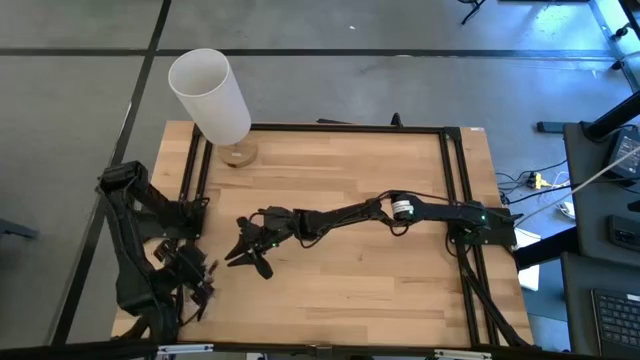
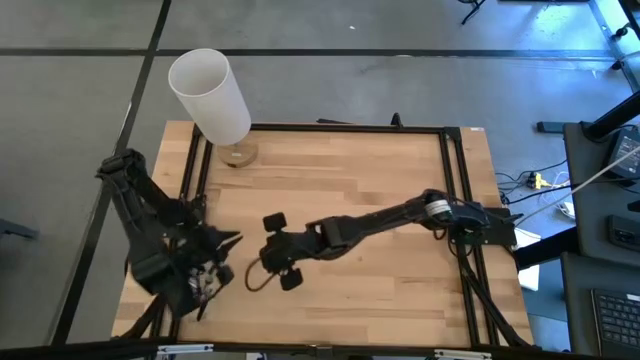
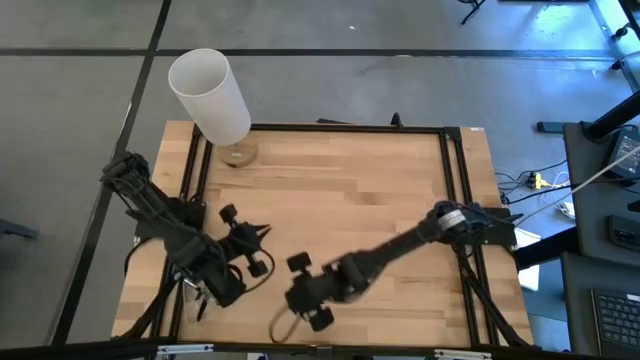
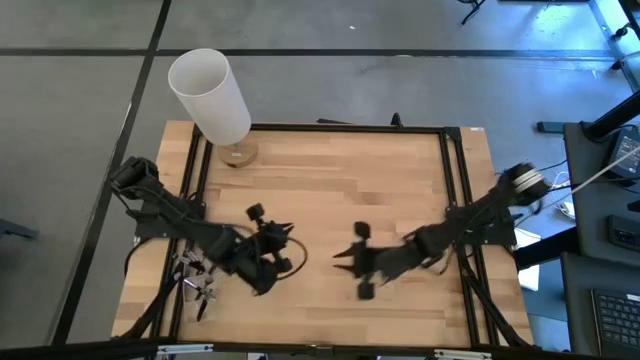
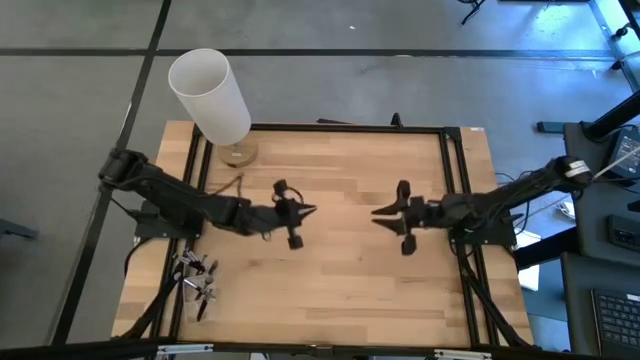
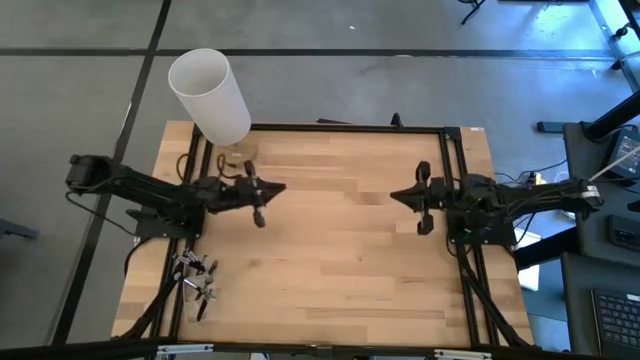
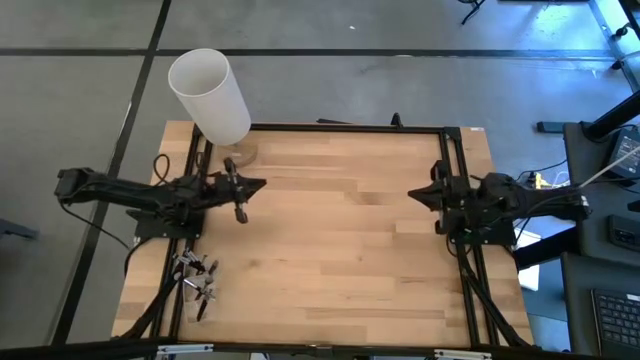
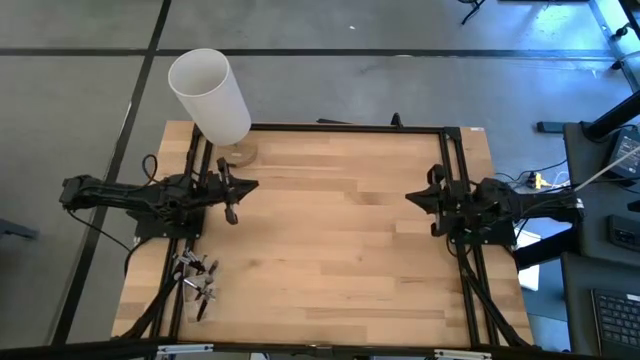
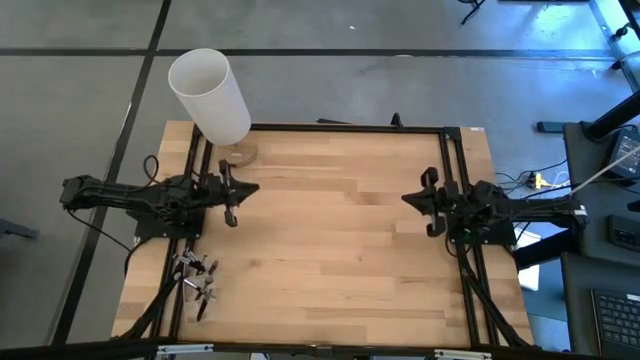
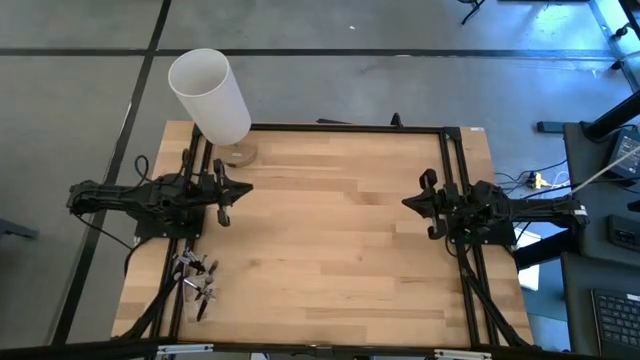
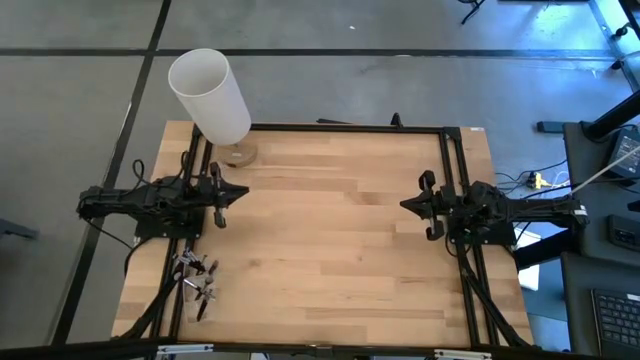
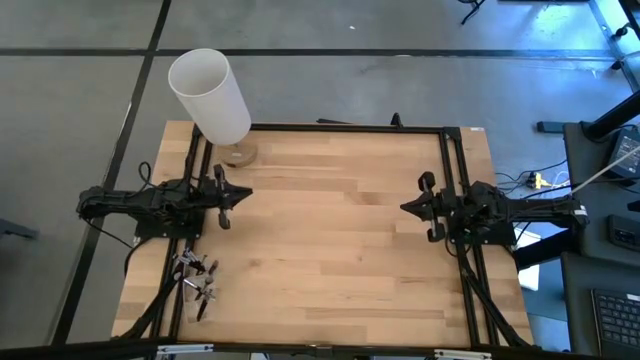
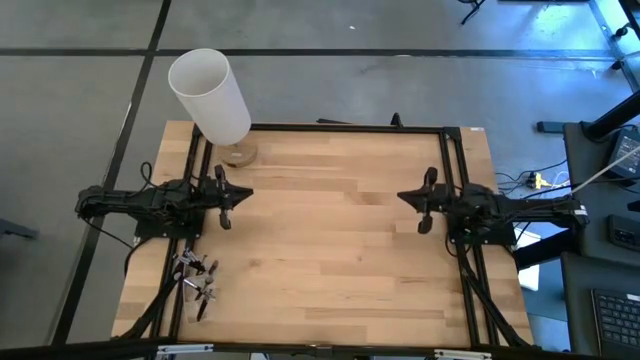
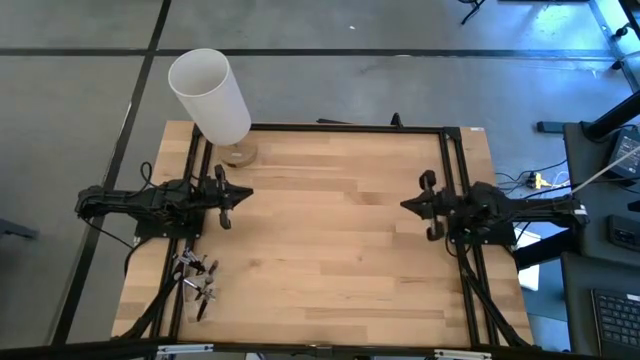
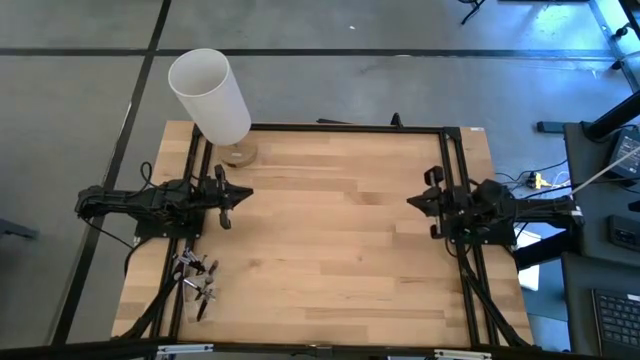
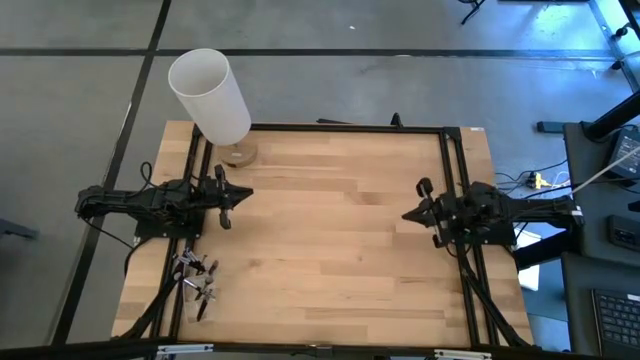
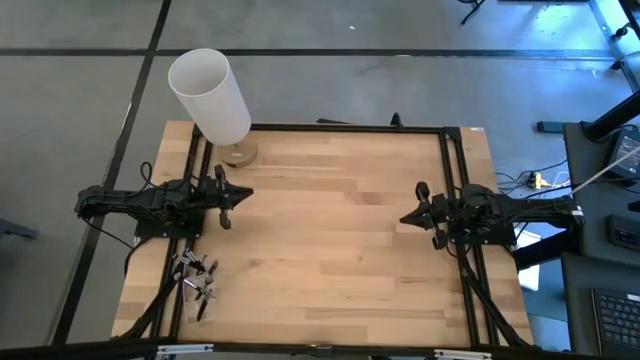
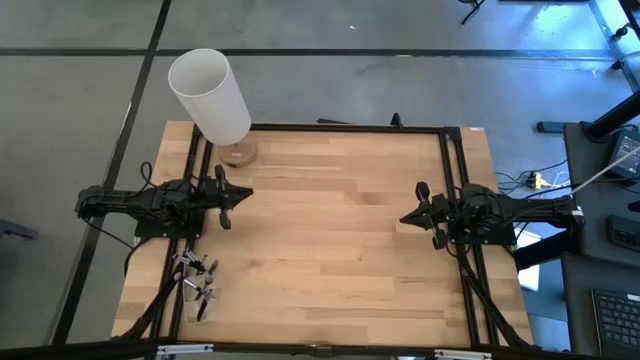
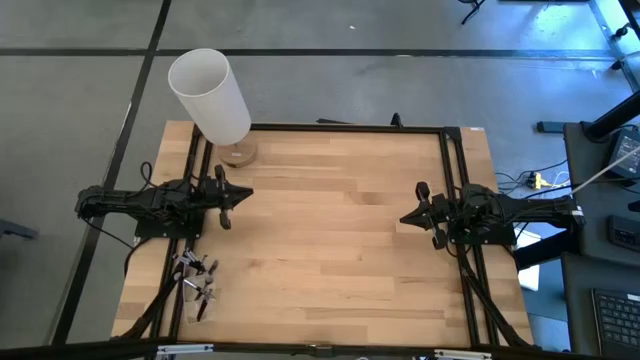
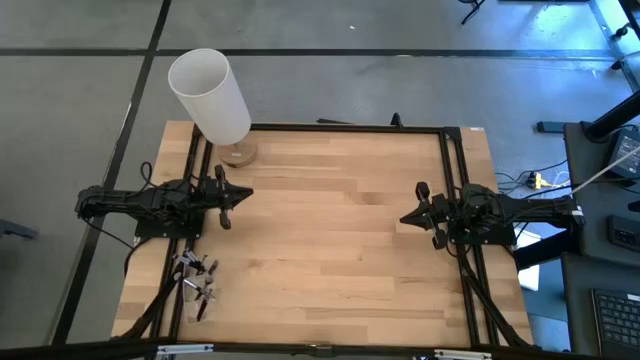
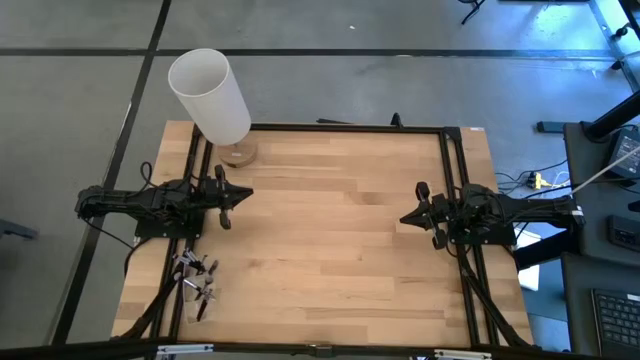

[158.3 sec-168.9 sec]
Task: Put items in baskets/containers
Return to Home Position

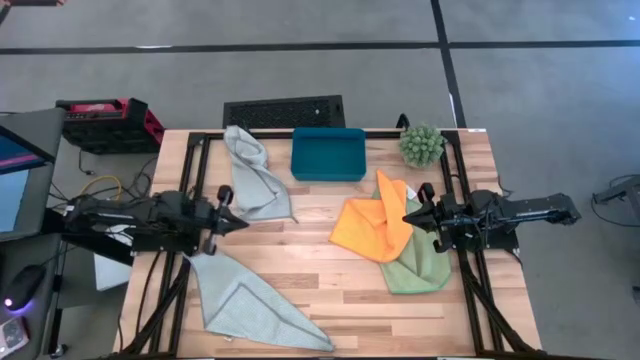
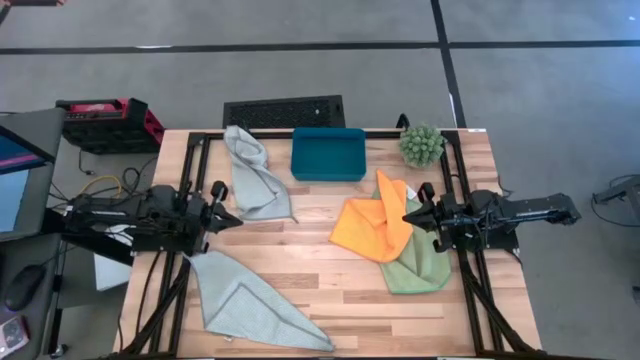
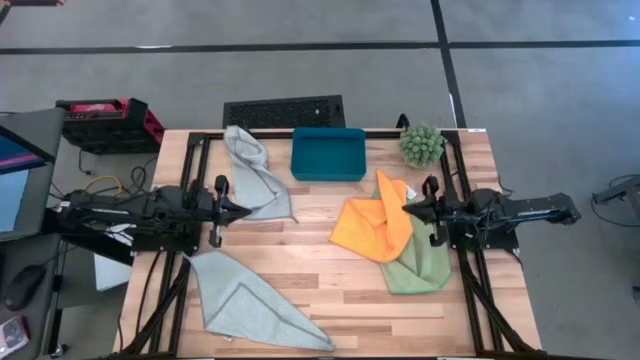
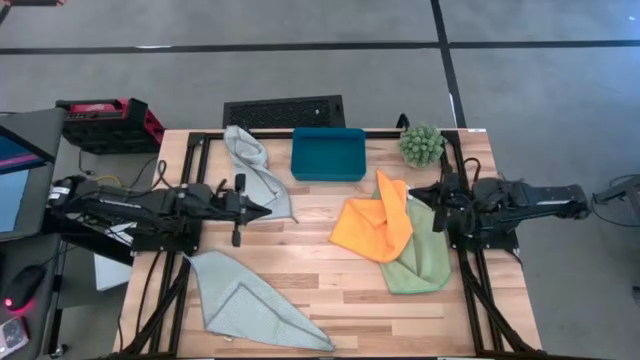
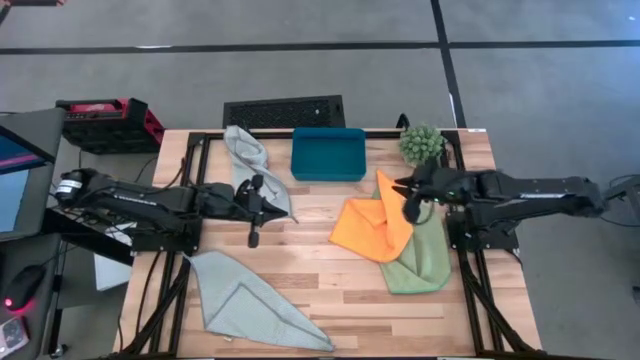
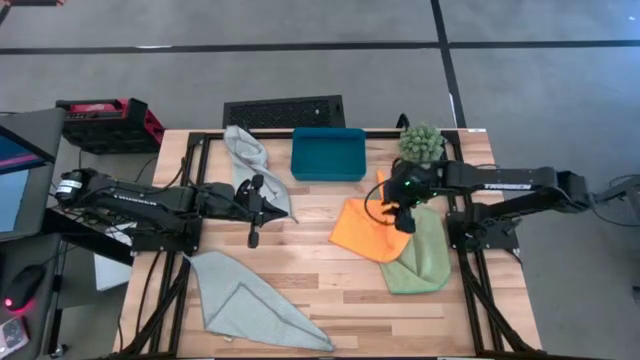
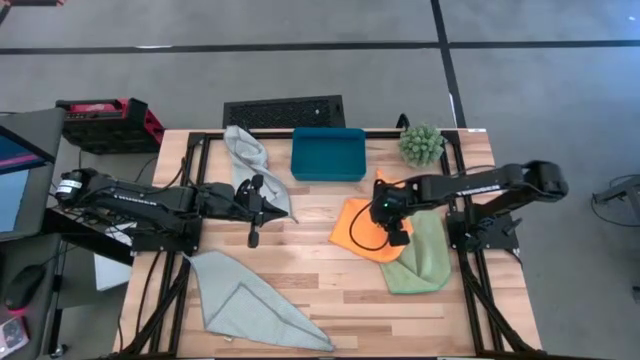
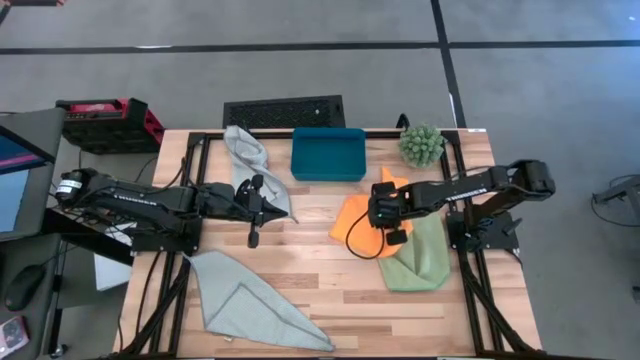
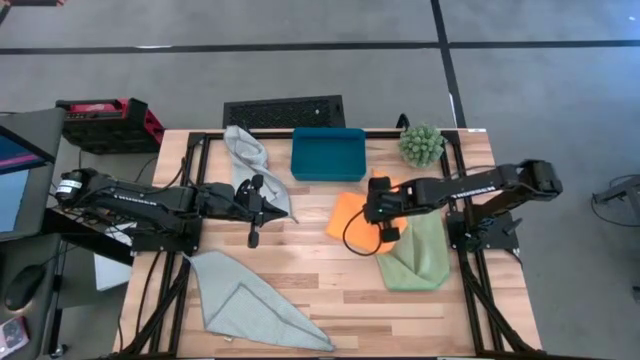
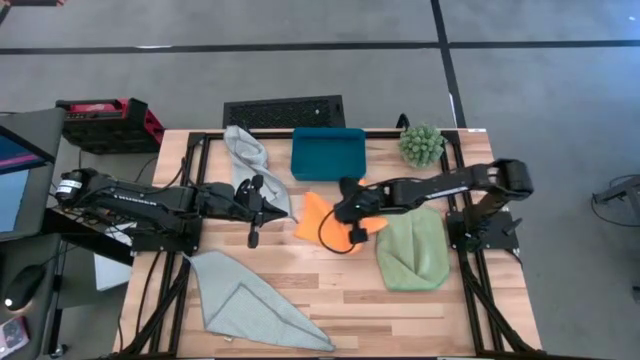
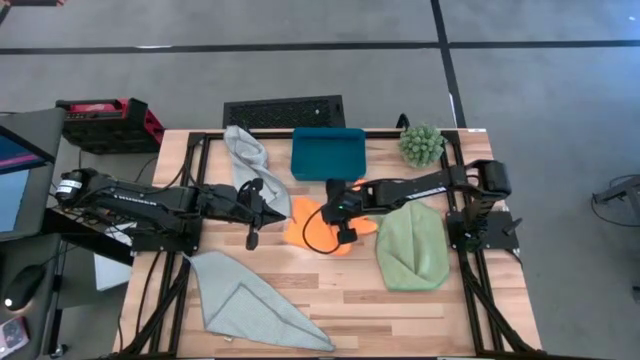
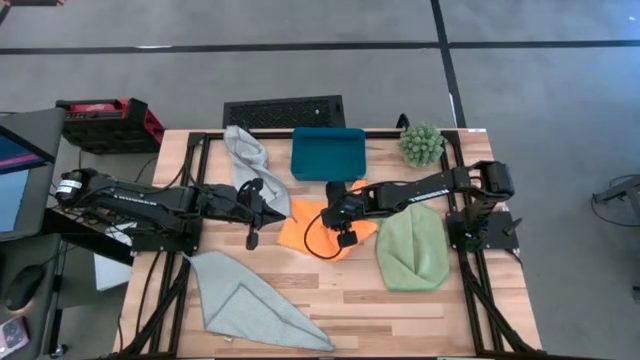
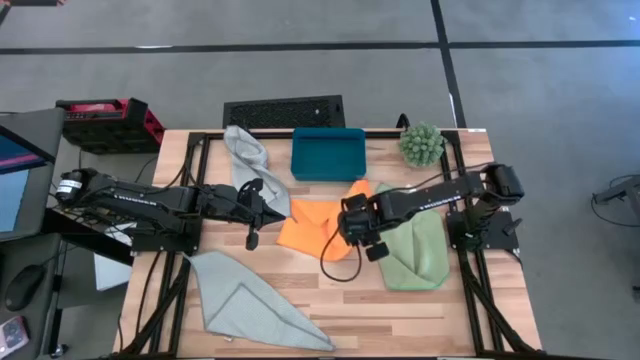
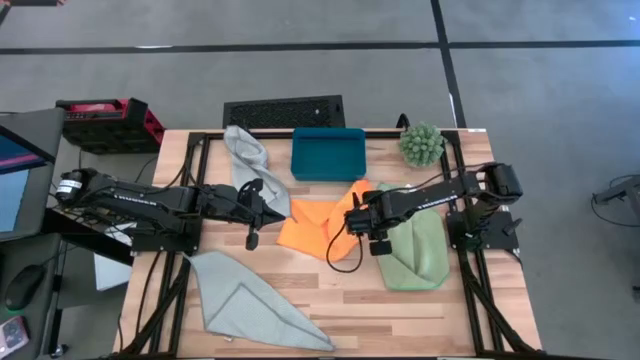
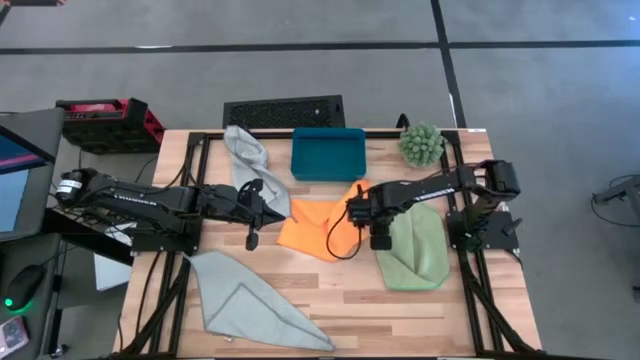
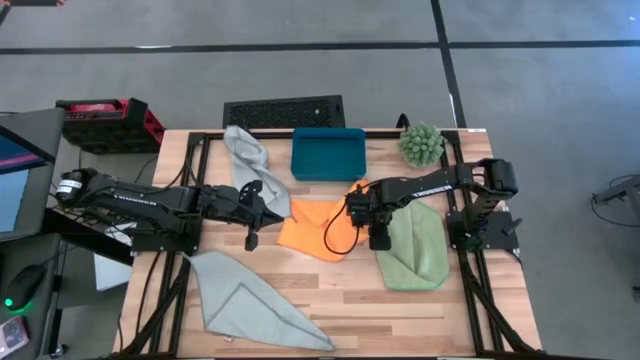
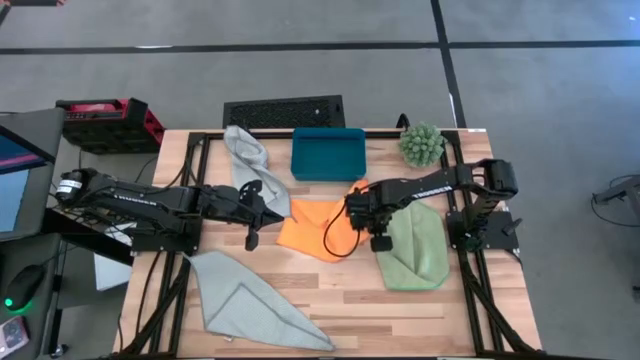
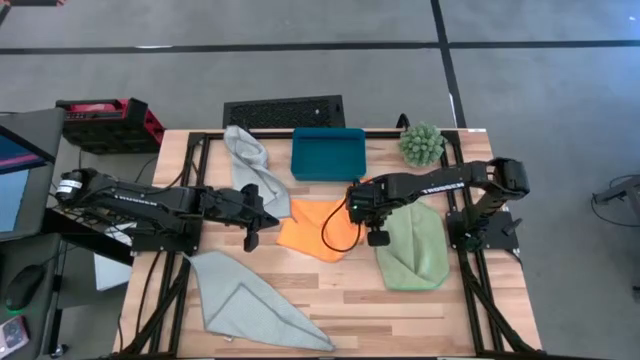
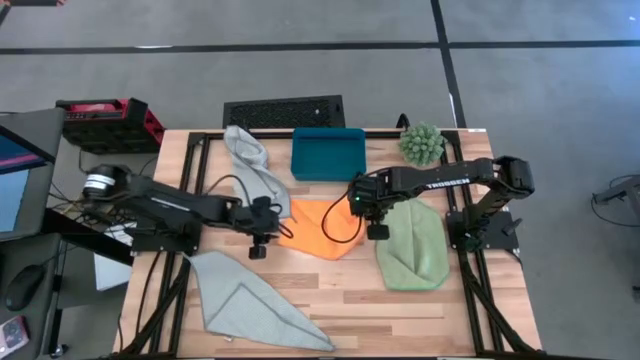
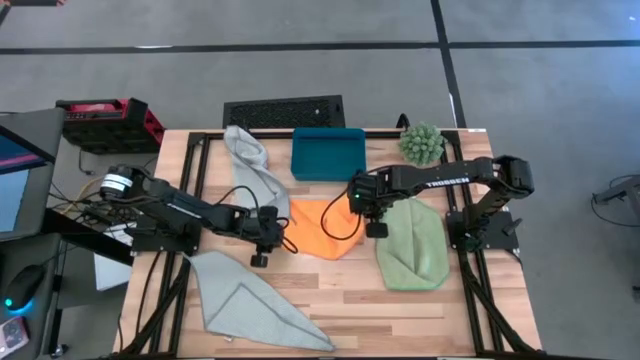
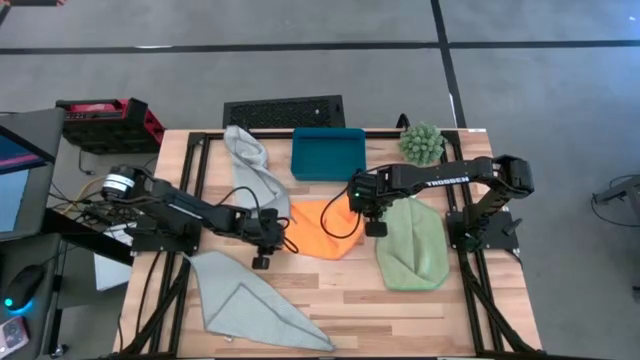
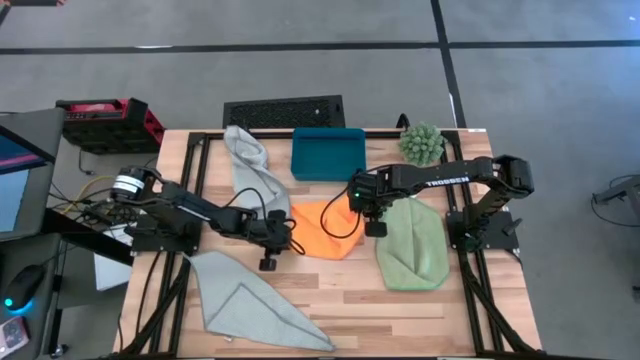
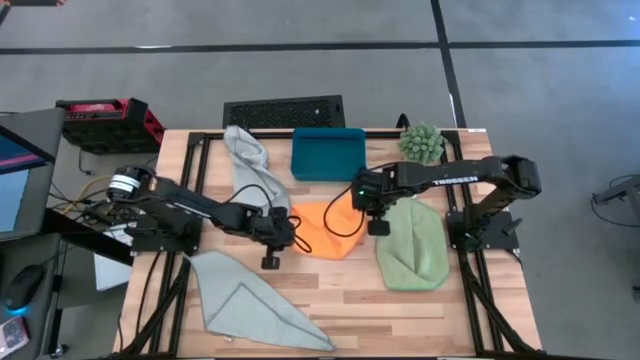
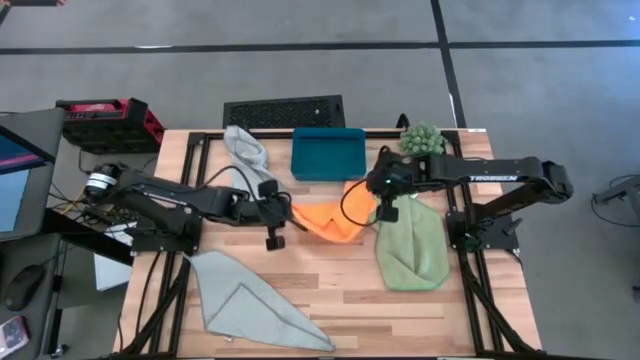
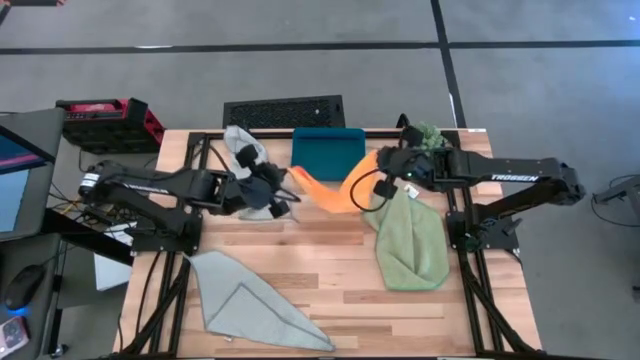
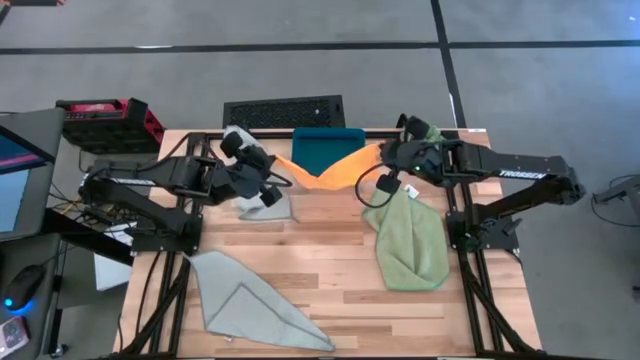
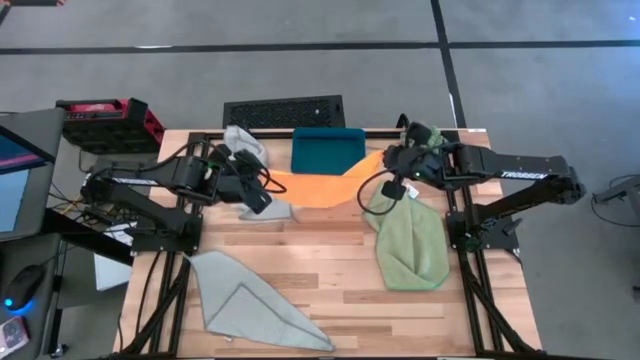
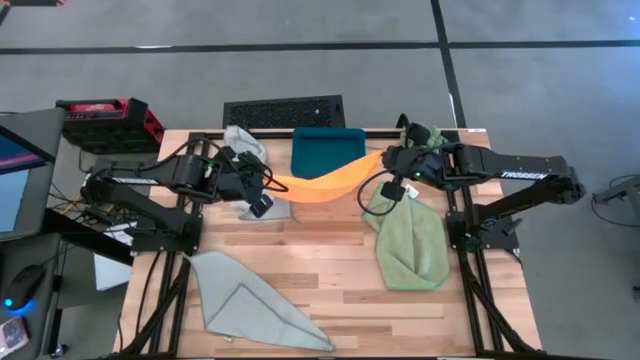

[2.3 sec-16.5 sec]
Task: Fold microfiber towels
Fold the orange microfiber cloth
